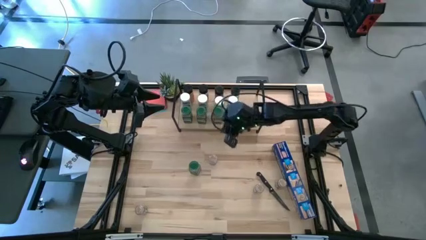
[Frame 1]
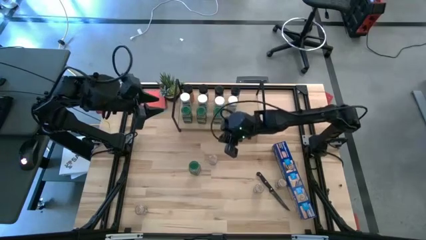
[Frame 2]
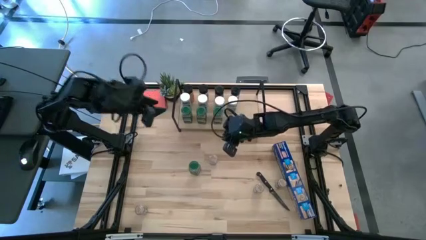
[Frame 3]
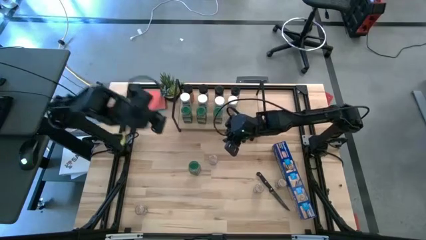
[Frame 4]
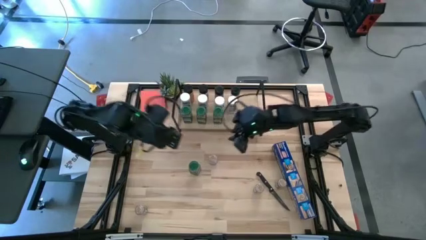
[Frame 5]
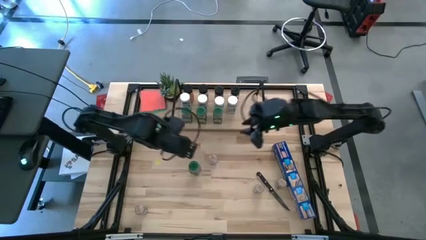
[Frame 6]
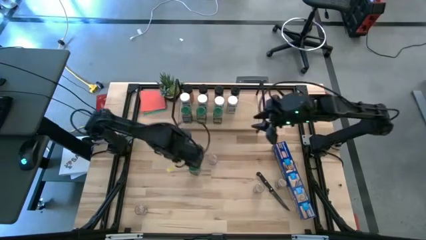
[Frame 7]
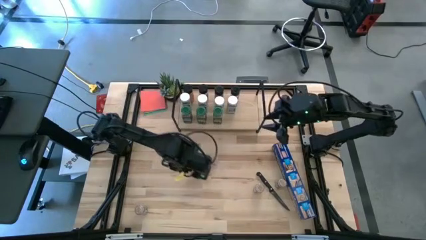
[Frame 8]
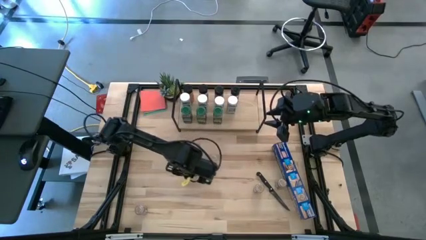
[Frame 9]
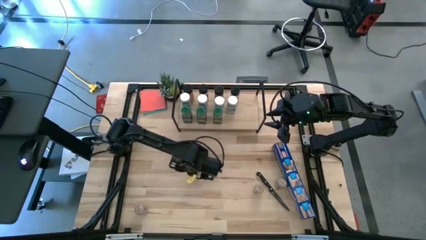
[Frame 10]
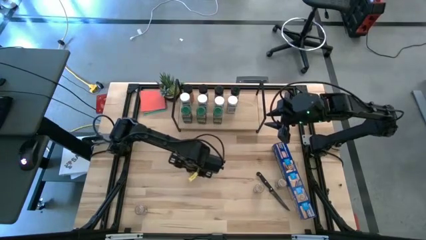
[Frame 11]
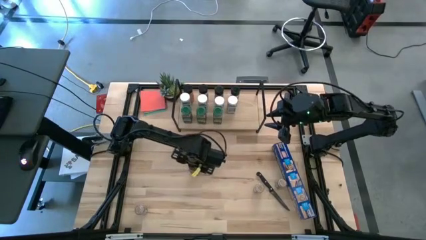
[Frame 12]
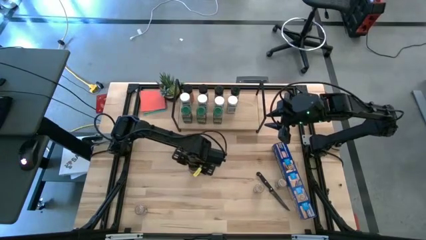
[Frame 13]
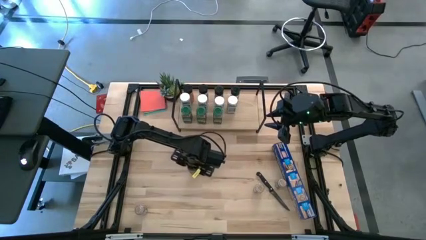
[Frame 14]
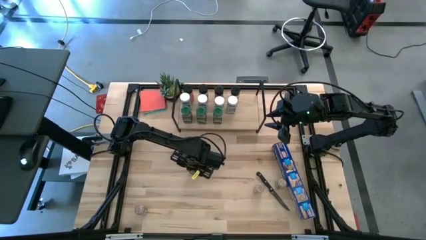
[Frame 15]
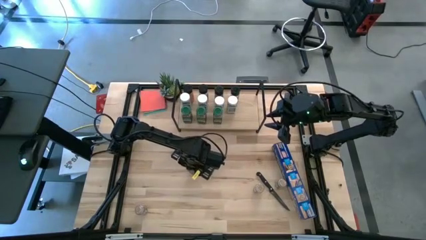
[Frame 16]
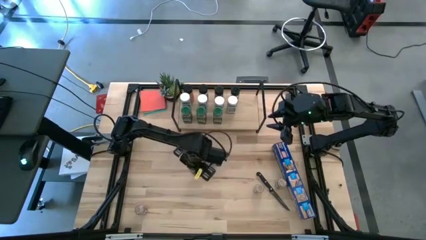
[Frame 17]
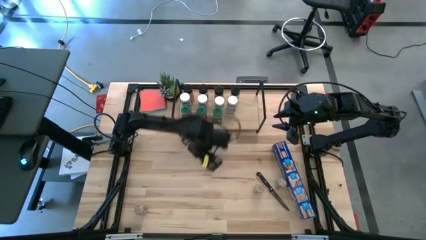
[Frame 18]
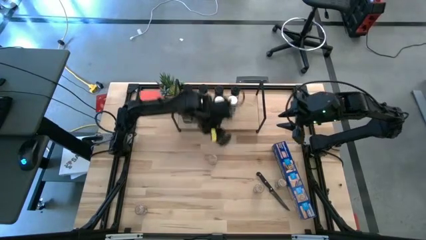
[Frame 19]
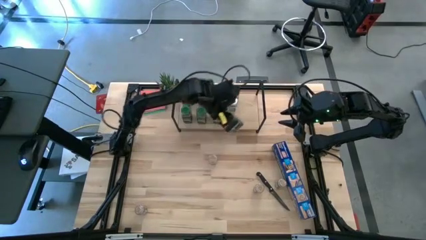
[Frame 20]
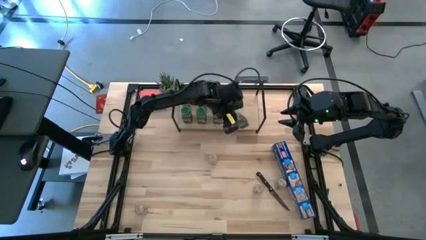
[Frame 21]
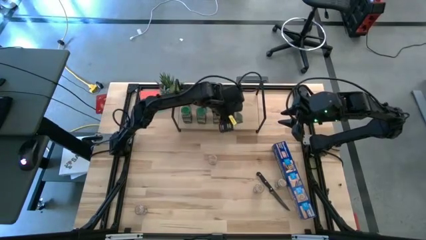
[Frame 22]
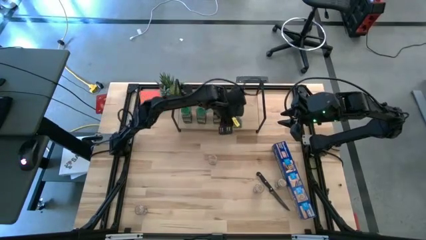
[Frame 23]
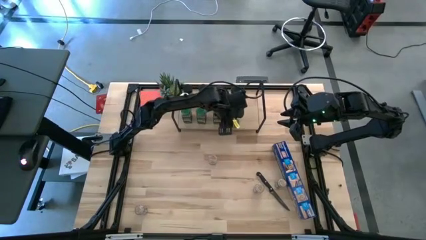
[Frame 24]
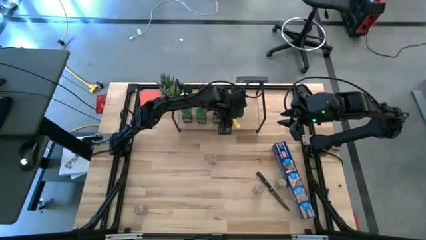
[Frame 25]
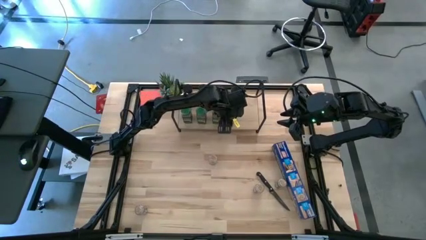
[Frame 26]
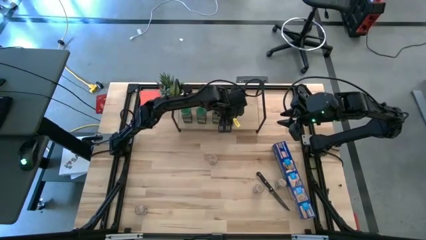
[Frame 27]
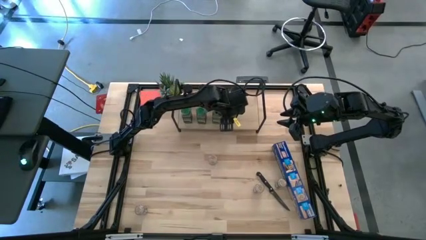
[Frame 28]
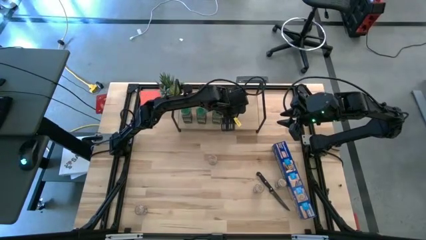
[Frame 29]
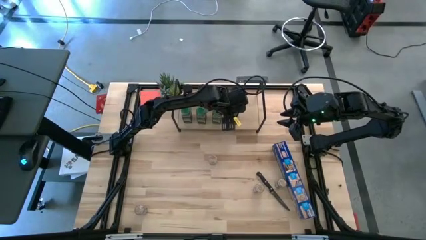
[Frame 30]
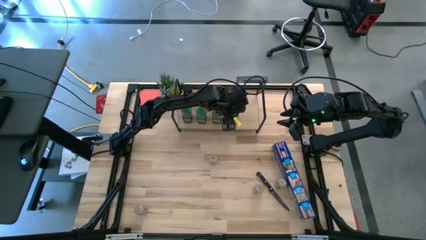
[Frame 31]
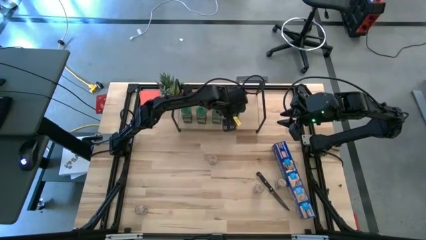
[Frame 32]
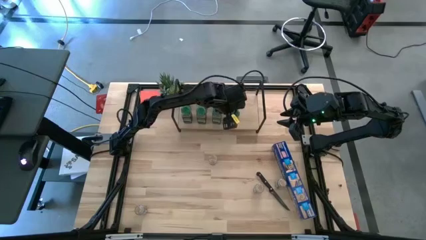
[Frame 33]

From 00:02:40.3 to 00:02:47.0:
Task: Shelf spices
Put the green seasoning bottle on the shelf aligned with the white seasoning bottle

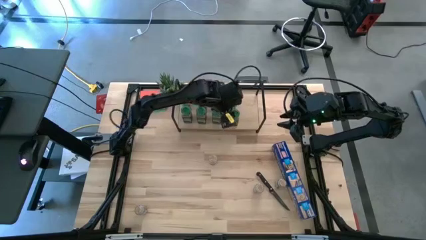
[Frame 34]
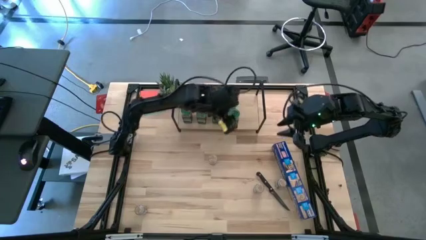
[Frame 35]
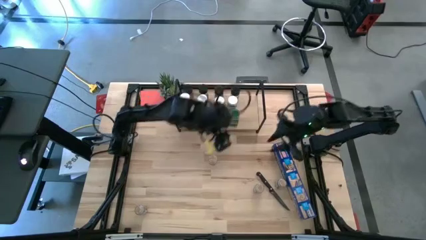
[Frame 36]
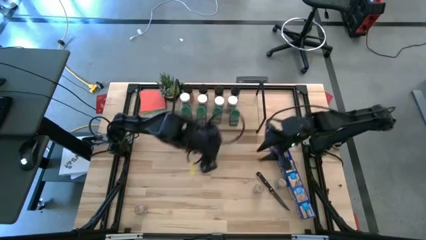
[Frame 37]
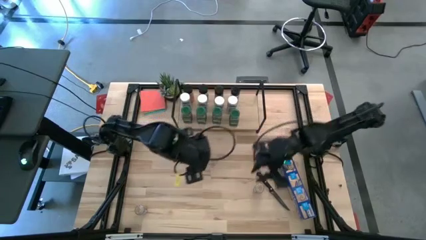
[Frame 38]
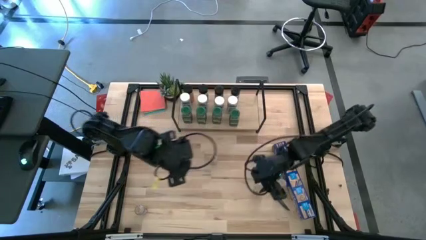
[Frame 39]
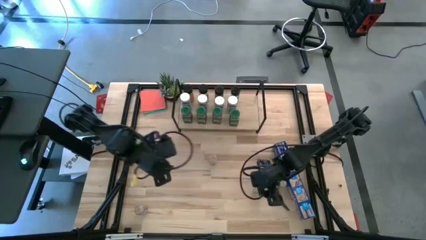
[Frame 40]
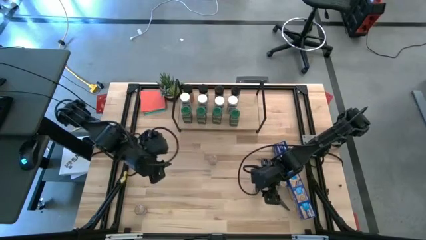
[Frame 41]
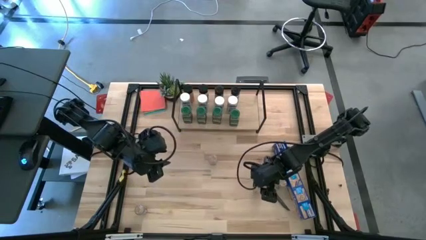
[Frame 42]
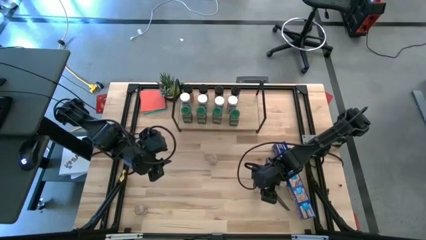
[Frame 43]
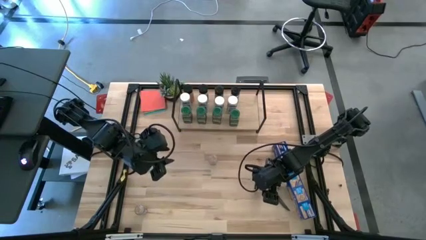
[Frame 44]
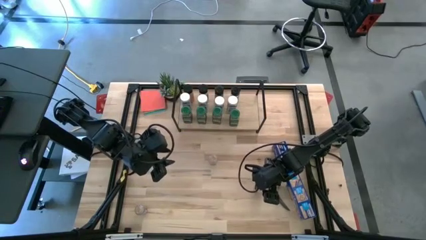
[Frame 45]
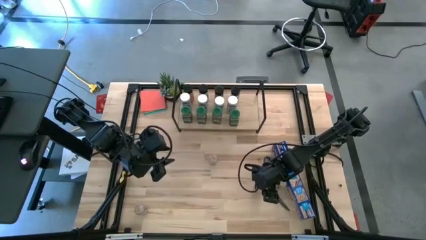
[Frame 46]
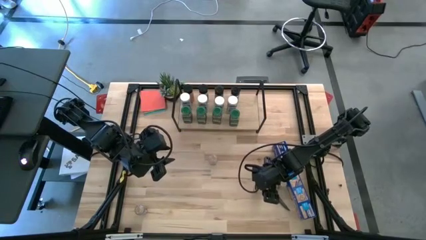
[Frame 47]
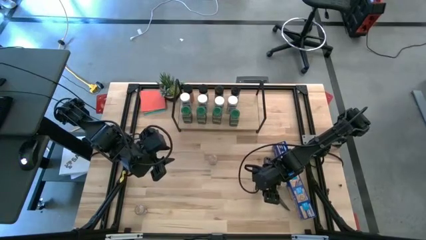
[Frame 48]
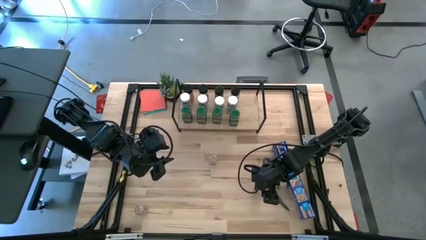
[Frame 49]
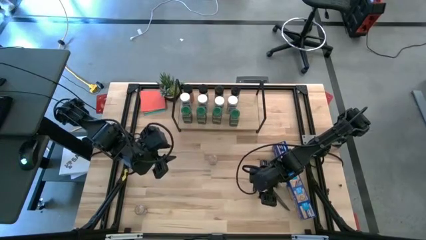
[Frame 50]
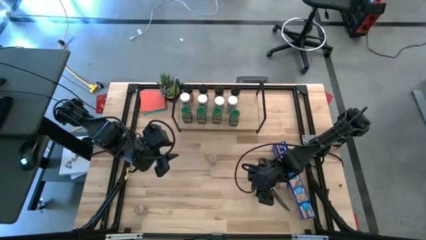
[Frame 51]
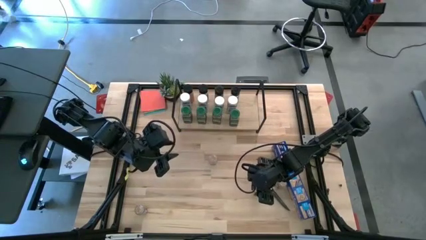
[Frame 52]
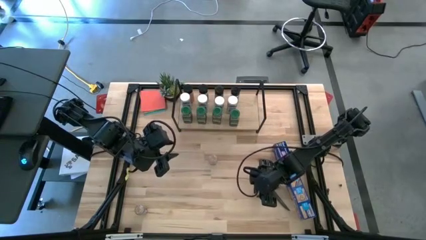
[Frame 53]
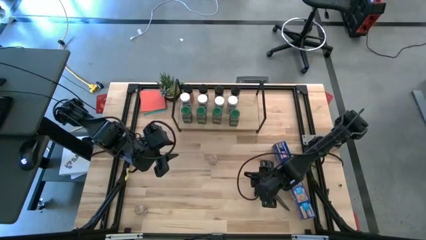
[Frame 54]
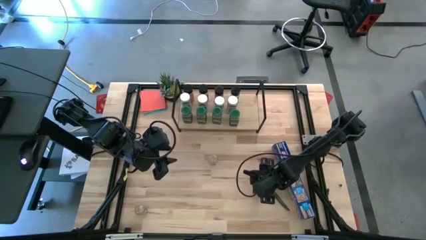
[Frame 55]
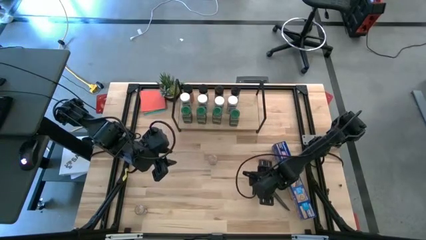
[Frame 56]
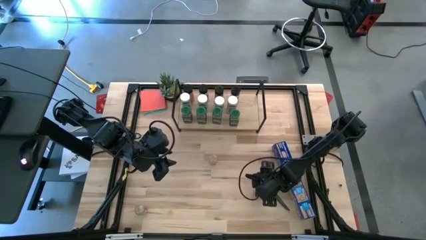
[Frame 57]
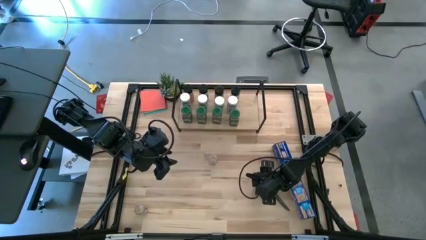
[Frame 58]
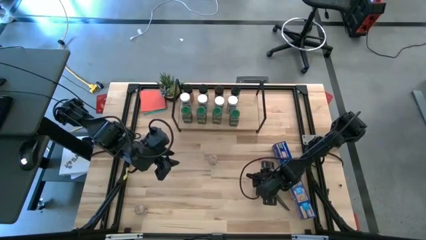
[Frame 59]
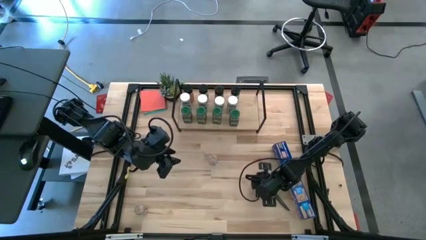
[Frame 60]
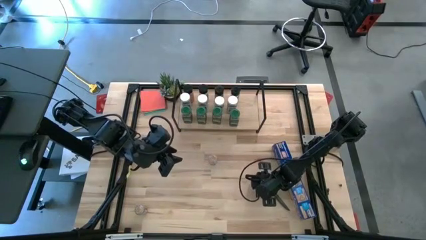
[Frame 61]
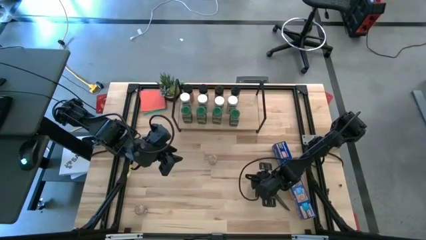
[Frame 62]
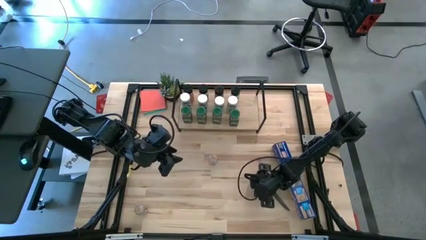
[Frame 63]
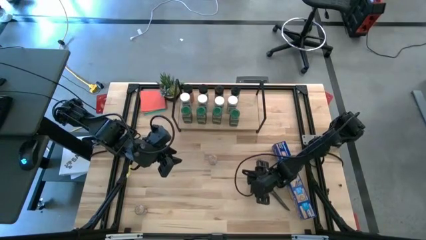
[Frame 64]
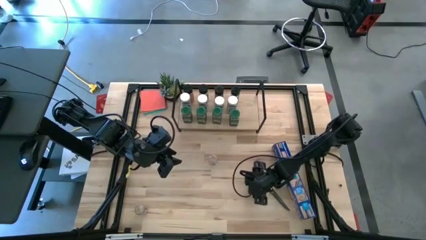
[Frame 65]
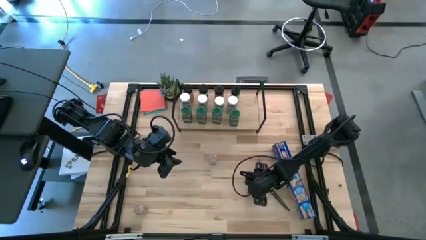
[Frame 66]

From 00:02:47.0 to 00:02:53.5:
Put the transparent seasoning bottle on the shelf

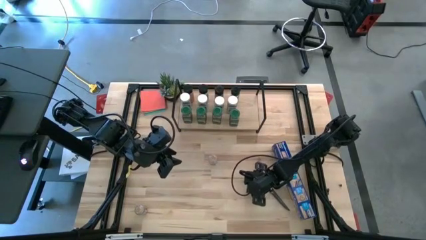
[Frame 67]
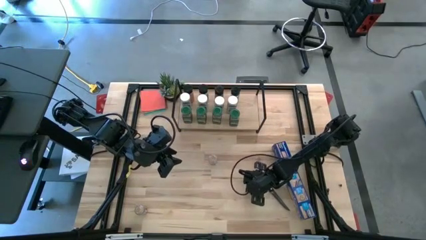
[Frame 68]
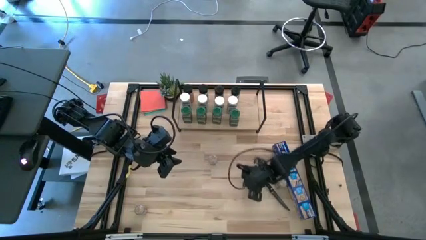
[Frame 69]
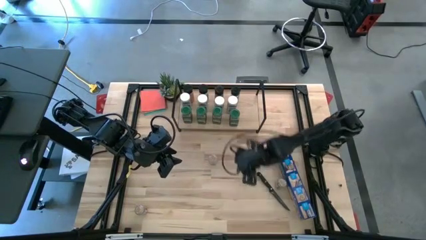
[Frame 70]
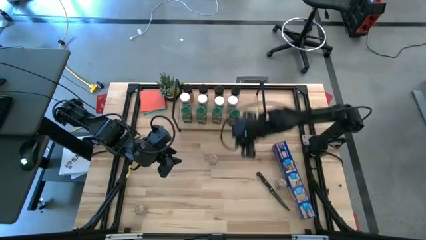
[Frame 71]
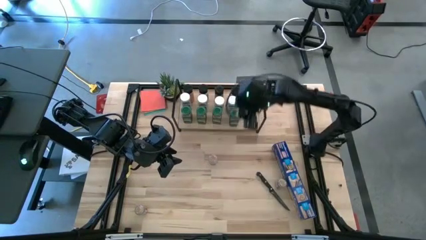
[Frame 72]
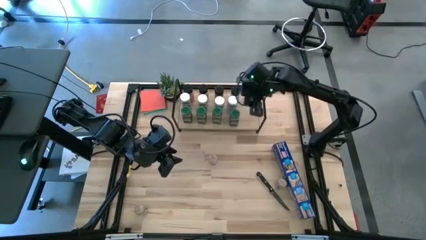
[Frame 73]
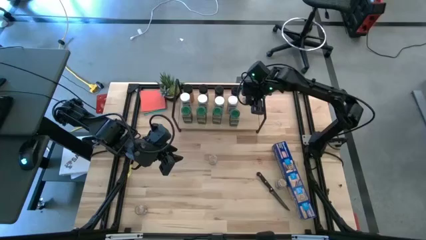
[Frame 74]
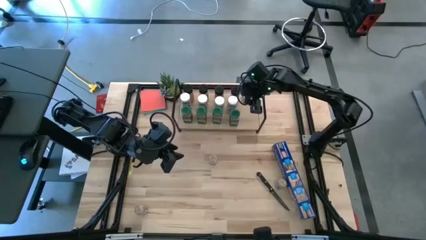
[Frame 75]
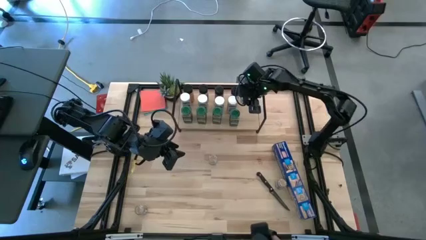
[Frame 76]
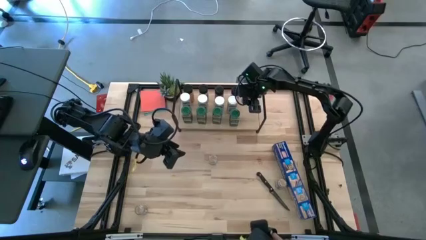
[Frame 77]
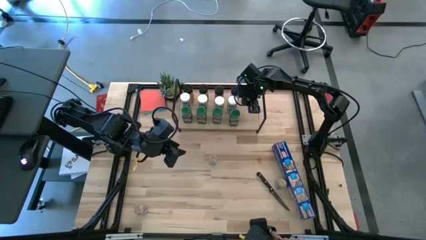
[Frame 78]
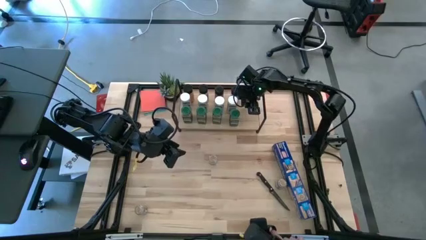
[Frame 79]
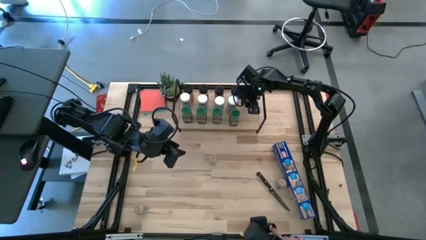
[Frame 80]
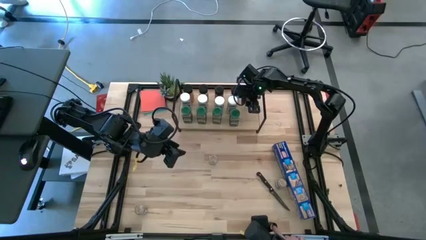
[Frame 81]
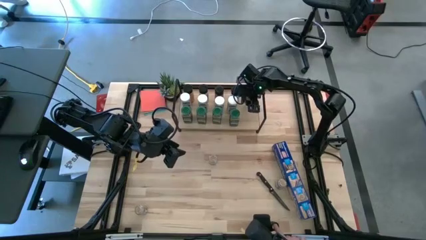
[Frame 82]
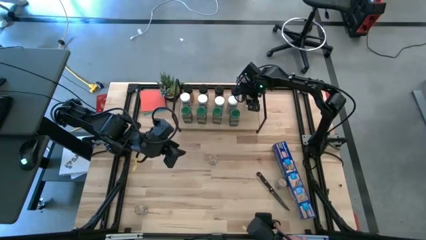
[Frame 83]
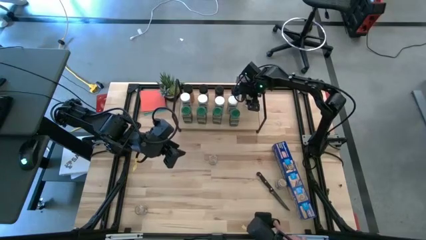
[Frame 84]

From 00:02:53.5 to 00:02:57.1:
Put the transparent seasoning bottle on the shelf
